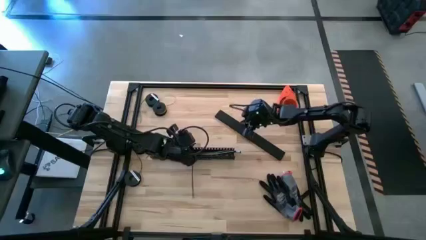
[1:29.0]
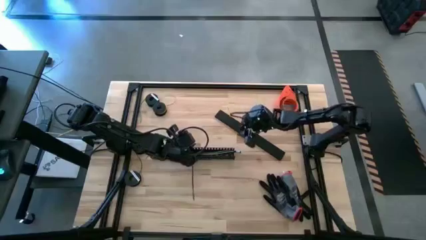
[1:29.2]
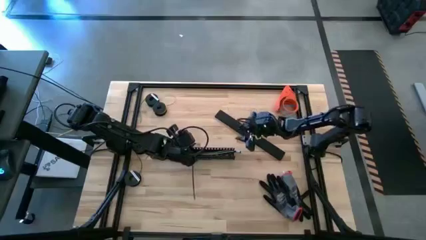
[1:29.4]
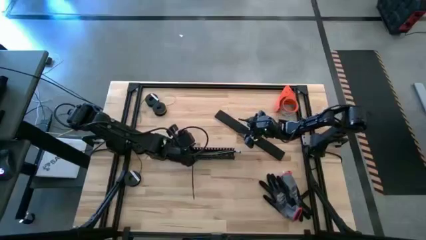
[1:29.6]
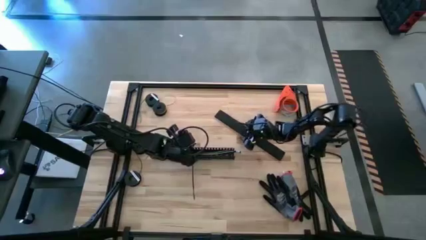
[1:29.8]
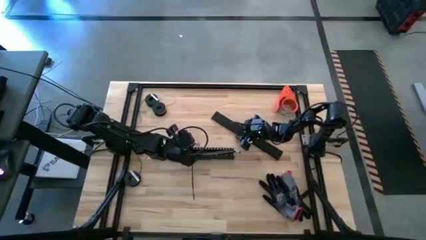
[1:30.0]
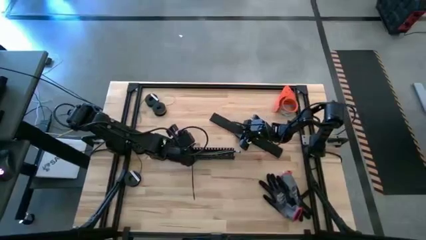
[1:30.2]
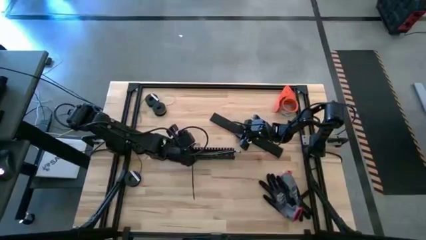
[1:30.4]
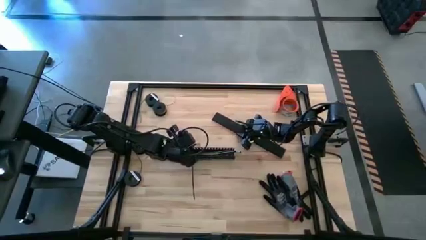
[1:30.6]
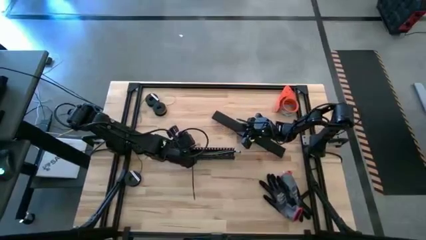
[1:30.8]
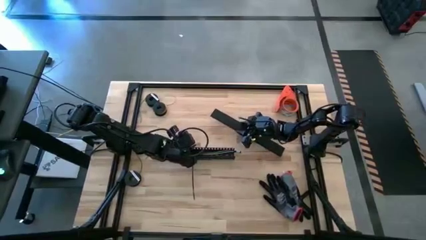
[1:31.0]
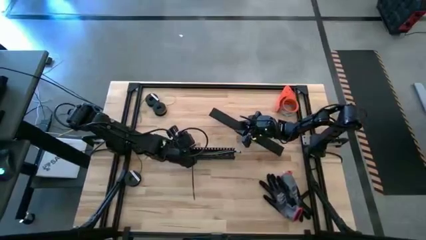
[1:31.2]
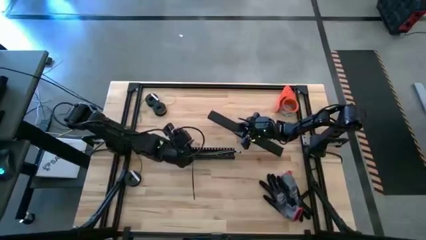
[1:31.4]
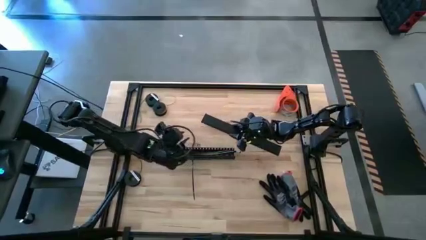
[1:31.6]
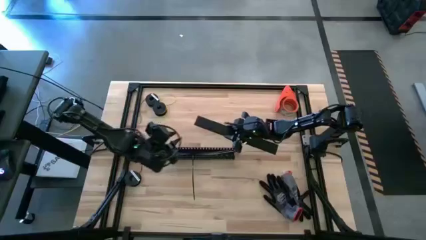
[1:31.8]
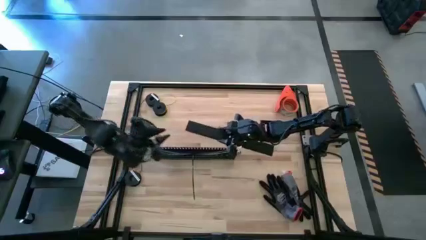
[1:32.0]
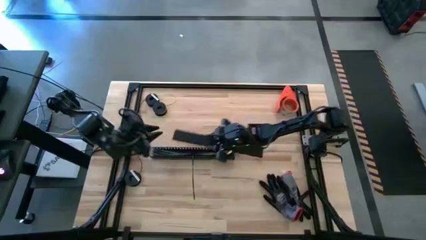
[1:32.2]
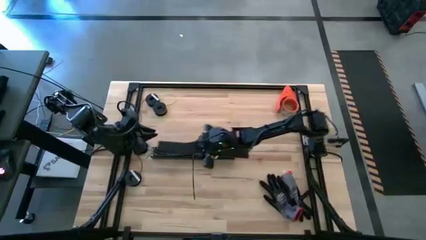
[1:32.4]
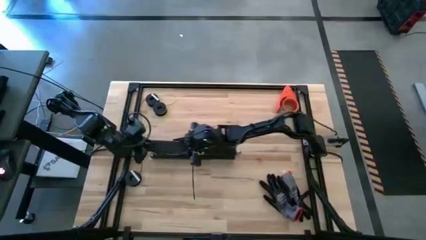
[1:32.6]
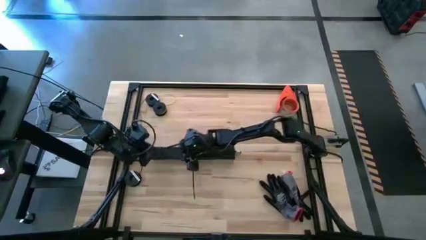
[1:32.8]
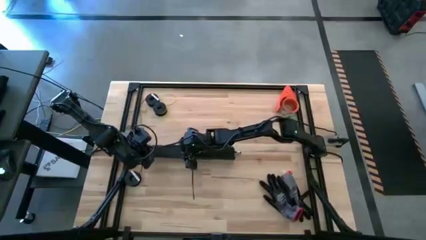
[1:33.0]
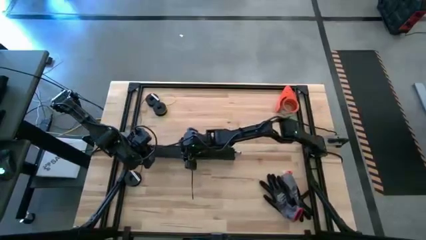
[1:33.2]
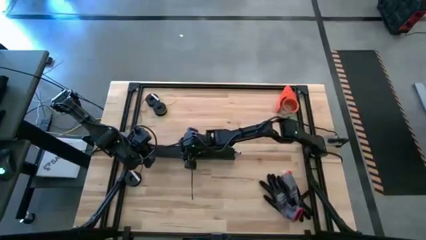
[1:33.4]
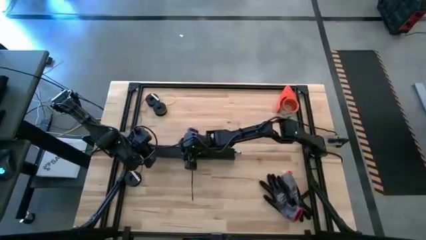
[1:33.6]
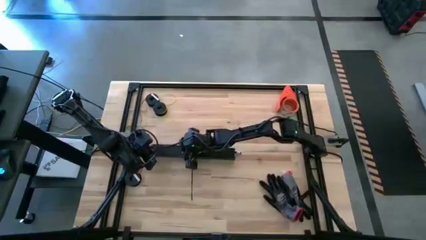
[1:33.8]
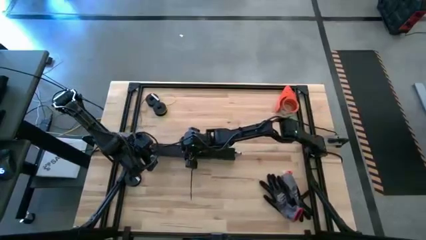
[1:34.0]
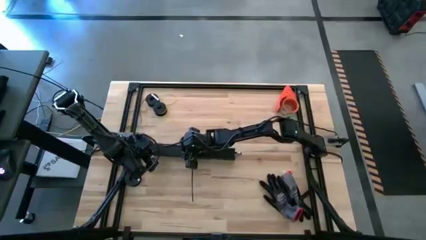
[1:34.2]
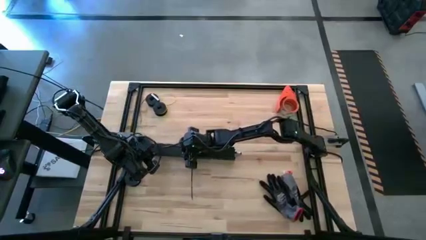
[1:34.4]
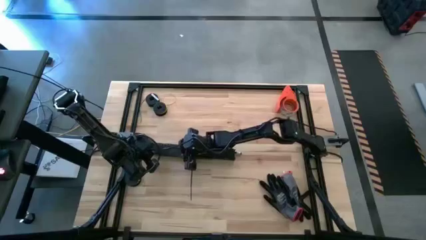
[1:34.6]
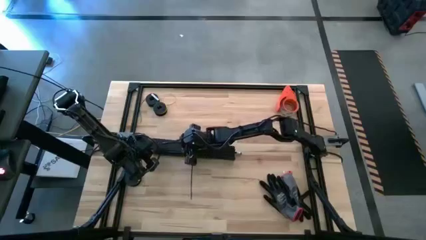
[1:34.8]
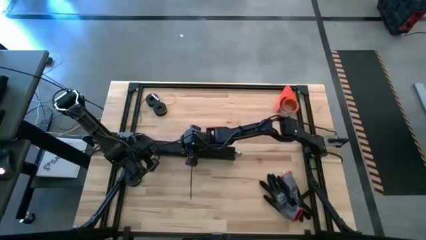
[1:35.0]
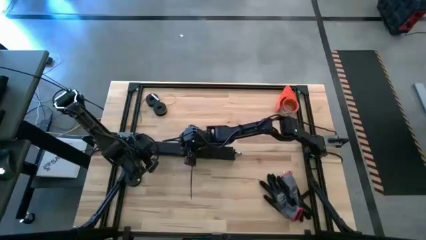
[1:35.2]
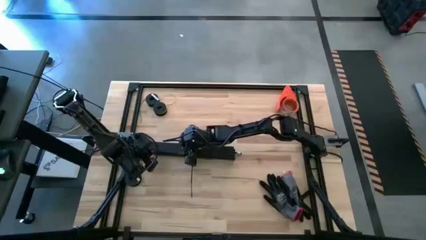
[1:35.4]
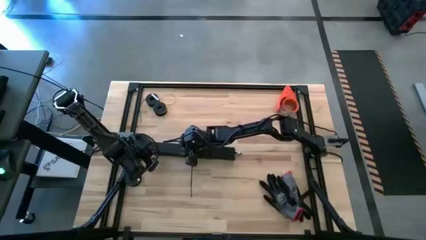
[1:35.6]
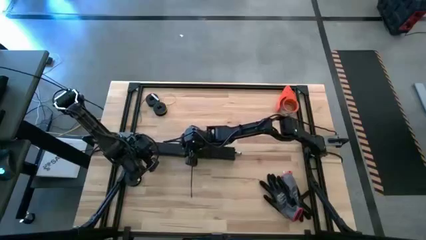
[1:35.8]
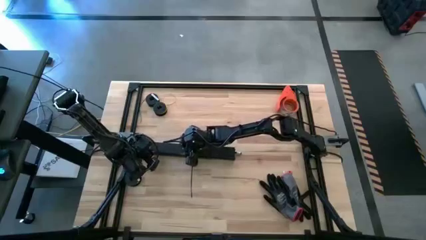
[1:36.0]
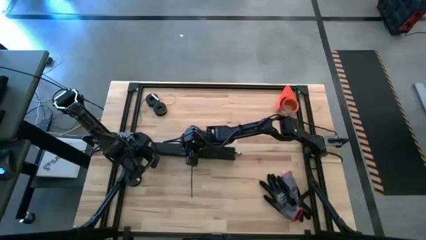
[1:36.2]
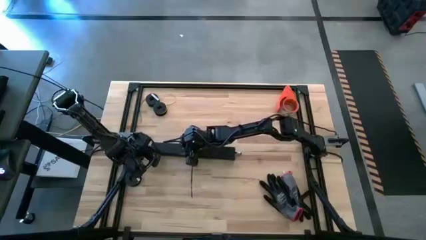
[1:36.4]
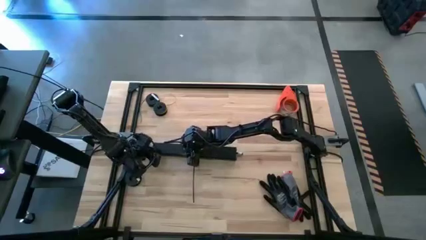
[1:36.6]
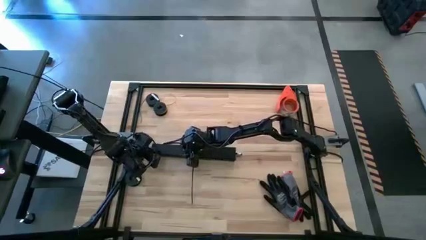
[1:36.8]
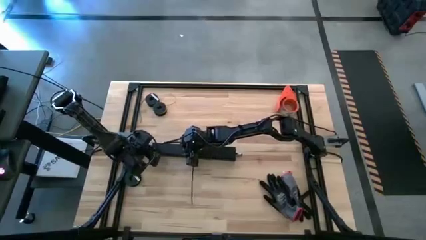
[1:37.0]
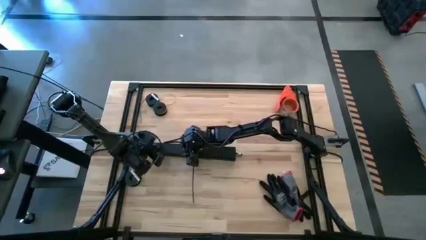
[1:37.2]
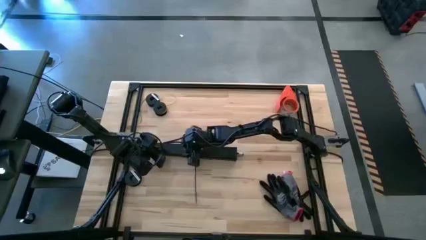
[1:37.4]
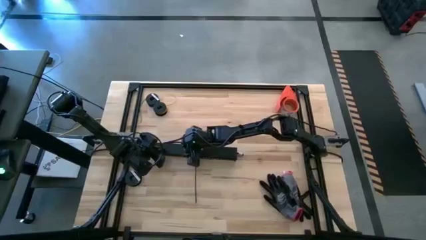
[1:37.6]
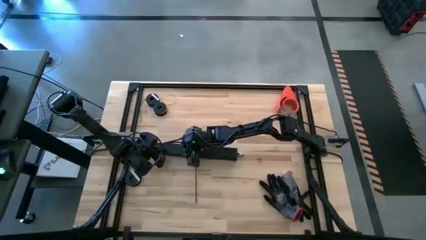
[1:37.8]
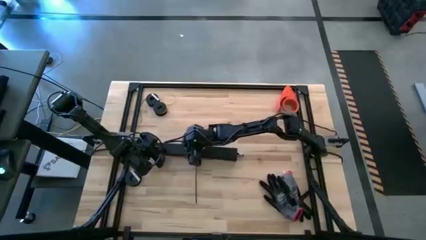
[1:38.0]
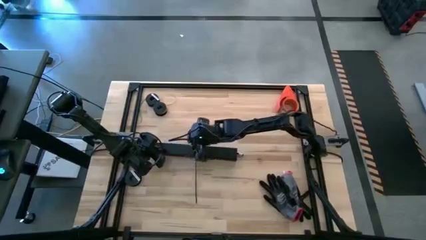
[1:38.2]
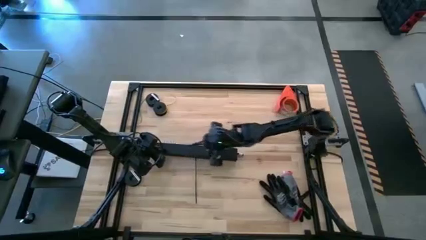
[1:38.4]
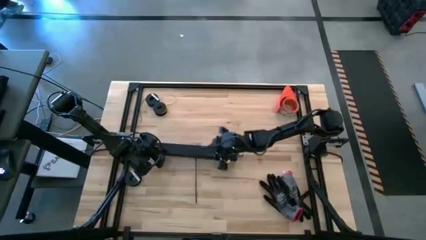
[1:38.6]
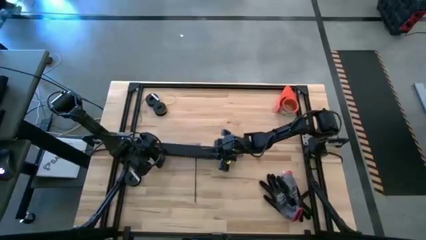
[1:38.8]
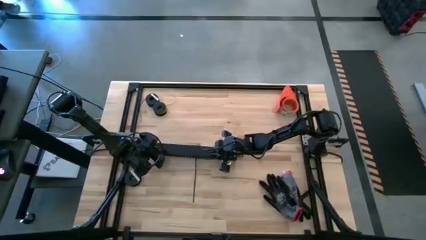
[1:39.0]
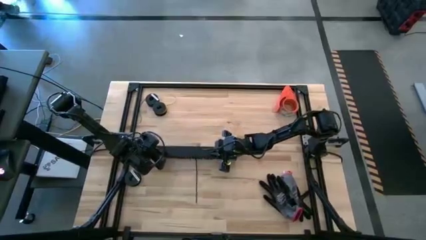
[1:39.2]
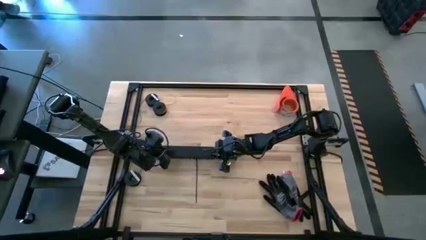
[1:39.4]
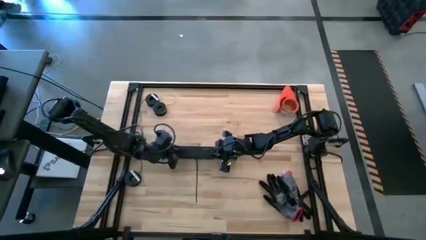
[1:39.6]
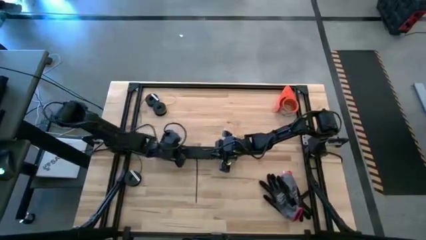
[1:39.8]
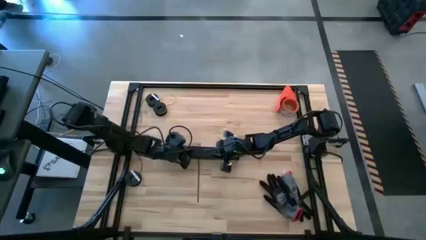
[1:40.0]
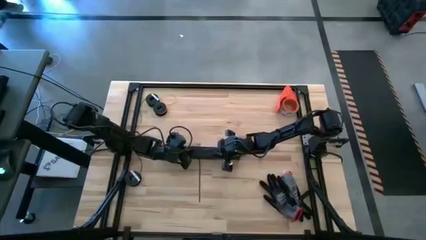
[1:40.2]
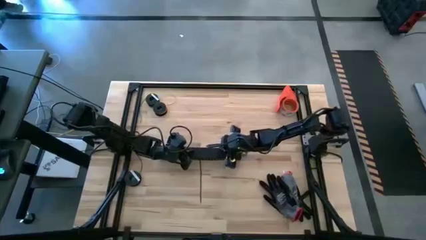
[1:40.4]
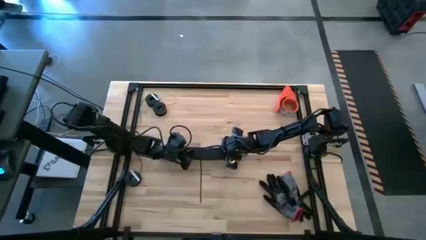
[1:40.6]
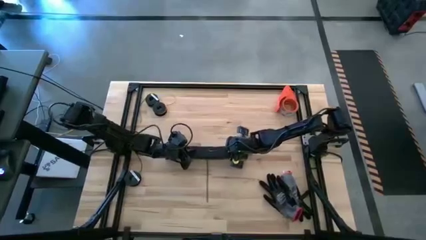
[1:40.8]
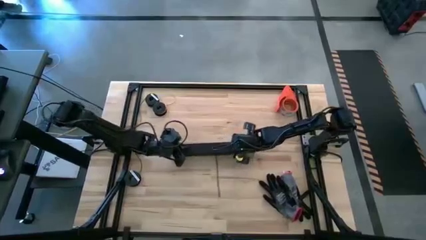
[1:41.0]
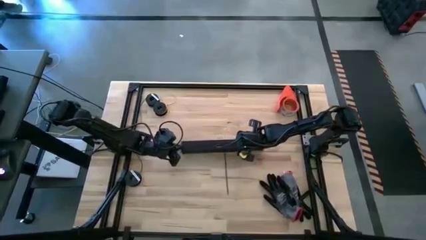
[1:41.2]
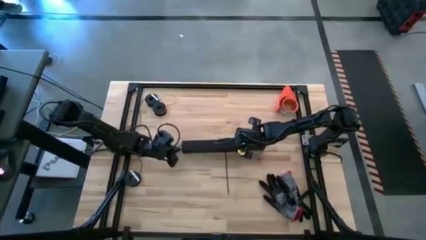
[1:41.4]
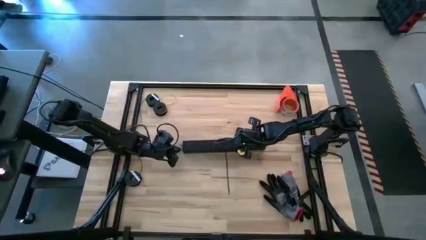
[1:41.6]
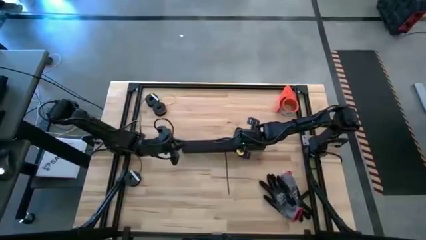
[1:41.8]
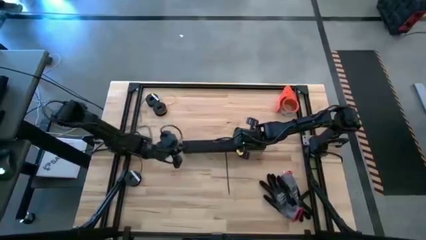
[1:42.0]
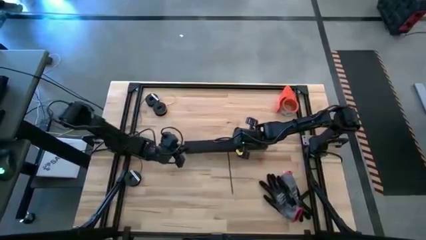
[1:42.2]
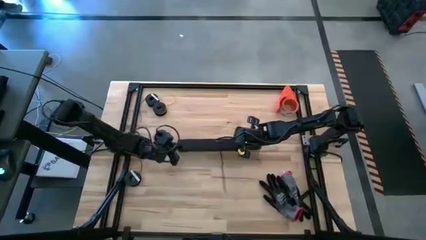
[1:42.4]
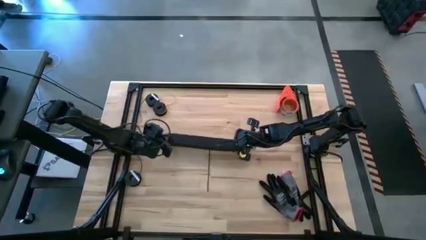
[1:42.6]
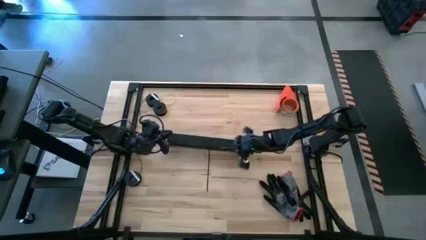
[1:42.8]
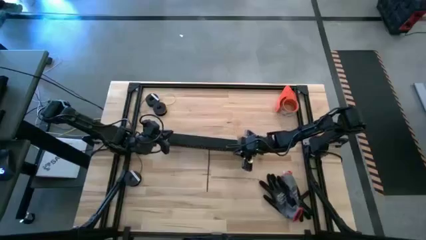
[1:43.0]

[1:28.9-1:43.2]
Task: Ziptie cables
Close the black cable duct

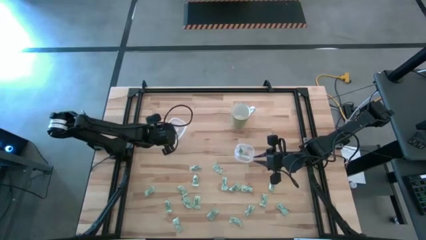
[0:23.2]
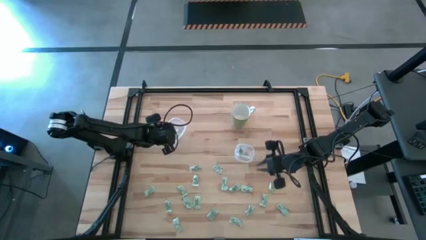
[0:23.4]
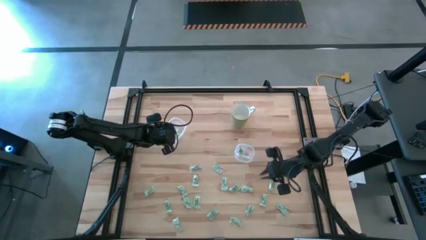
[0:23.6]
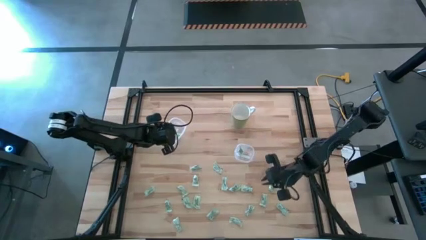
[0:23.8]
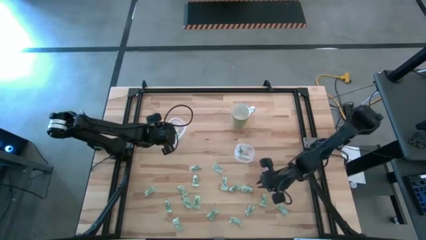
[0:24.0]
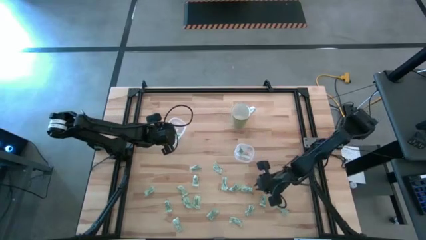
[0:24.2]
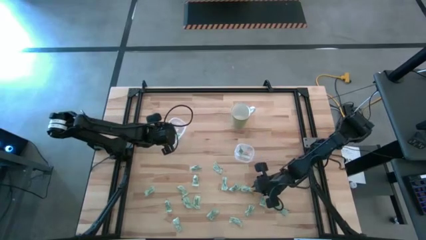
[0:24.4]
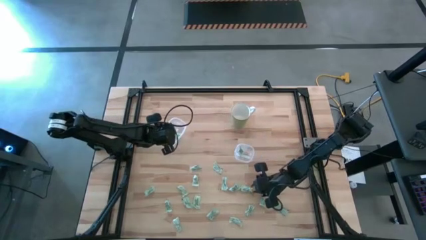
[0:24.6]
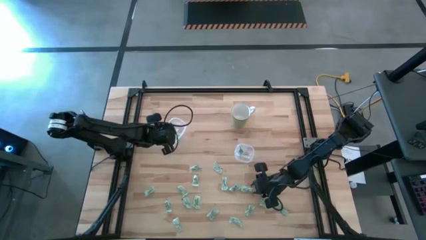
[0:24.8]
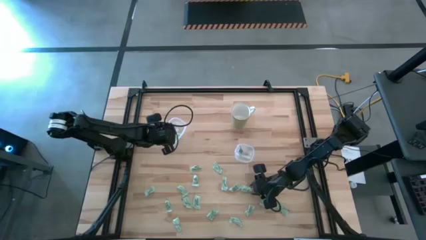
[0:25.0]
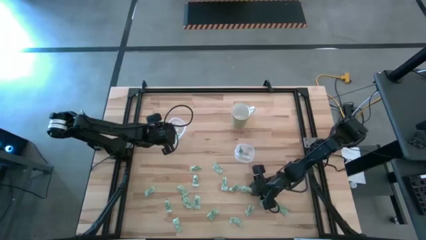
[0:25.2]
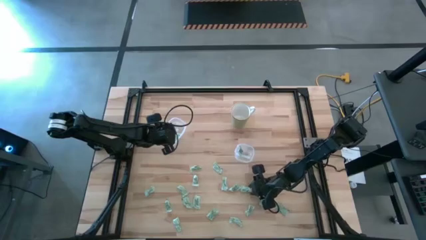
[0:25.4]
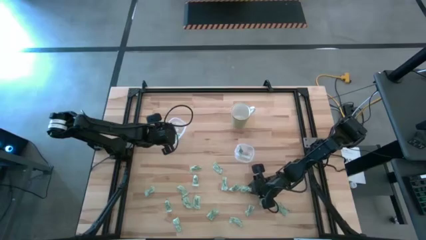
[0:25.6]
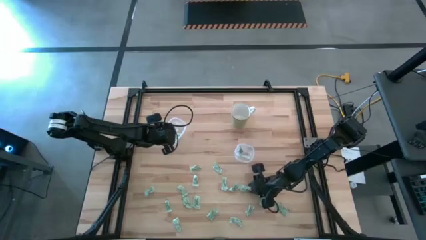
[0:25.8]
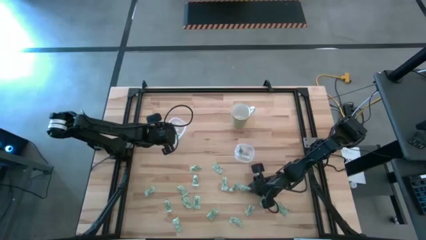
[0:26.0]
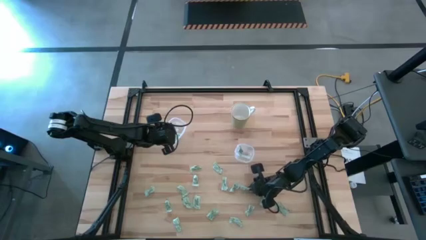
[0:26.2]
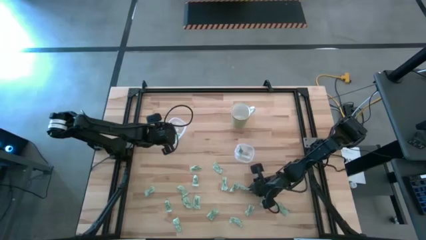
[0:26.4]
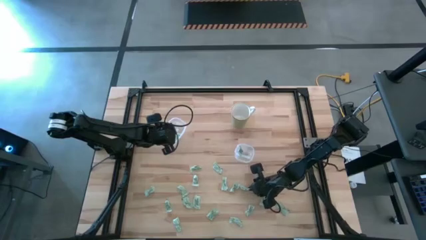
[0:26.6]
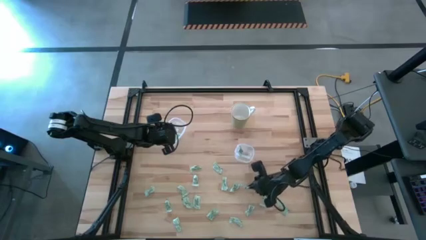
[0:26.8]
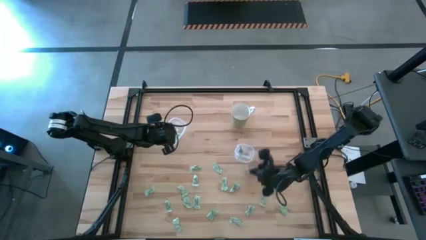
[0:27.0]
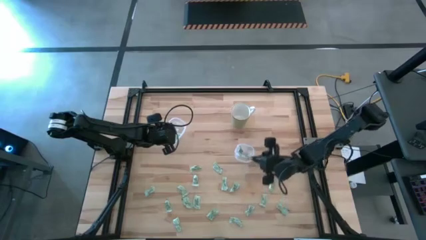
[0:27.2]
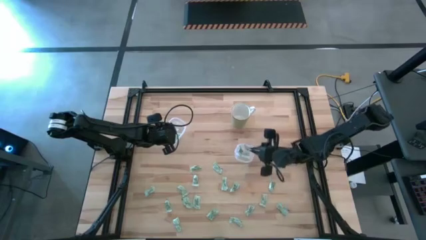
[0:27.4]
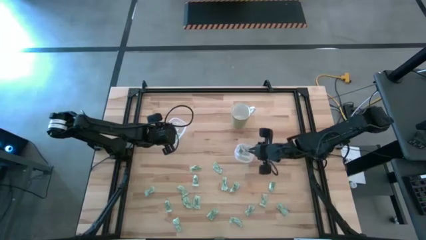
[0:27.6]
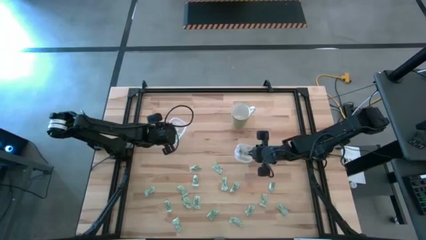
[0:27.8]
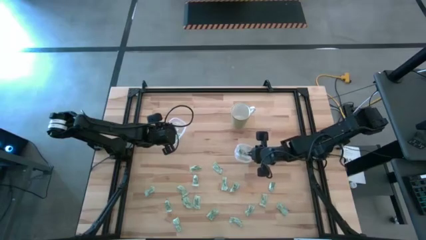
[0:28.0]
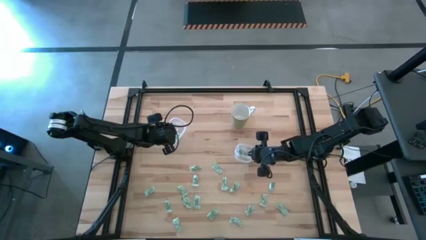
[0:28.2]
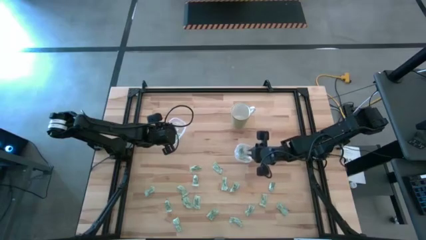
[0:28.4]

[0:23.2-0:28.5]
Task: Pick and place Stevia / Truvia into bins
Put the stevia packet into the right transparent container
